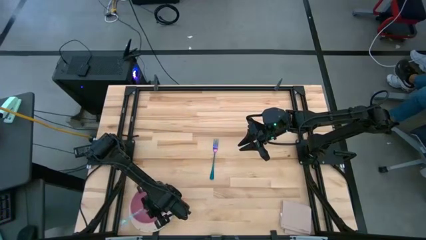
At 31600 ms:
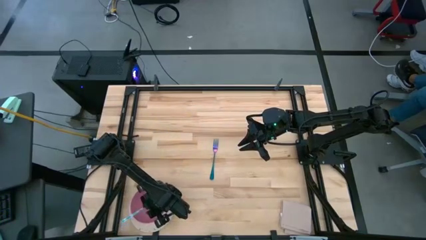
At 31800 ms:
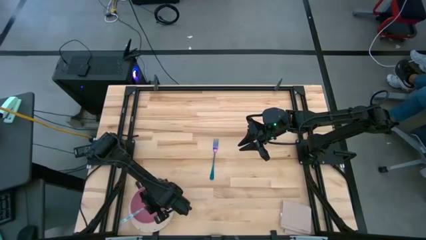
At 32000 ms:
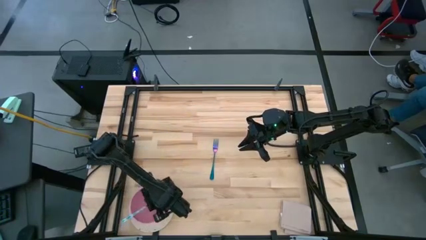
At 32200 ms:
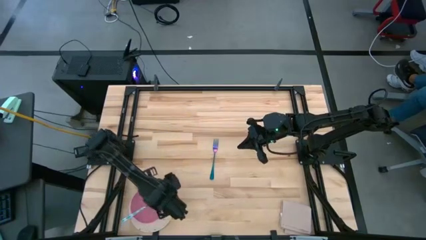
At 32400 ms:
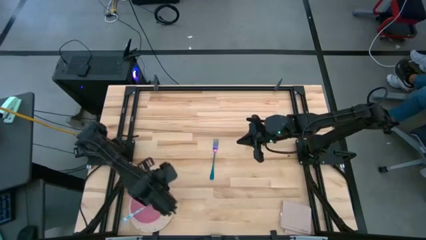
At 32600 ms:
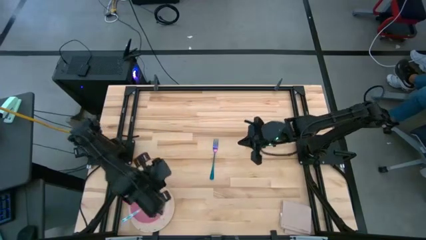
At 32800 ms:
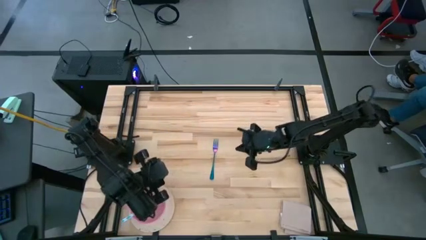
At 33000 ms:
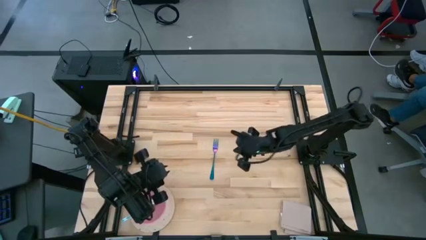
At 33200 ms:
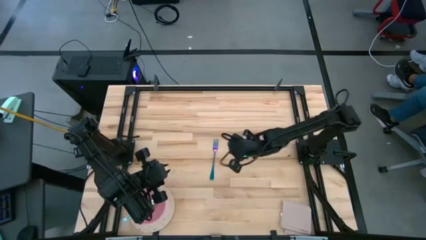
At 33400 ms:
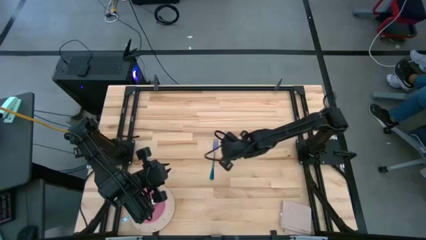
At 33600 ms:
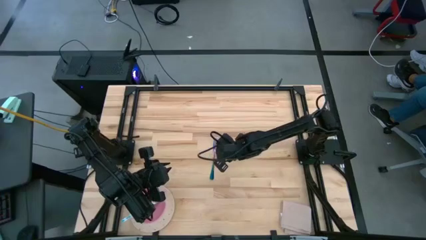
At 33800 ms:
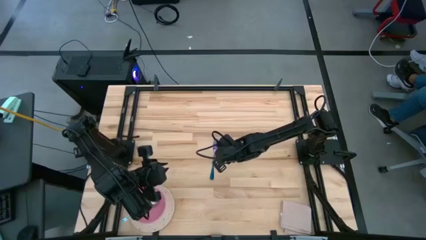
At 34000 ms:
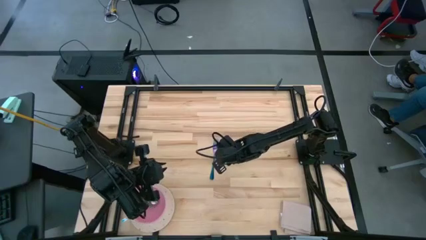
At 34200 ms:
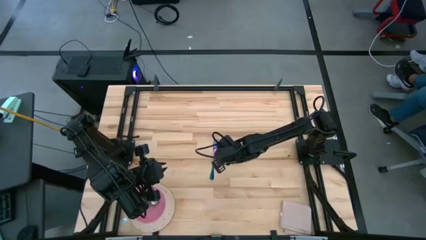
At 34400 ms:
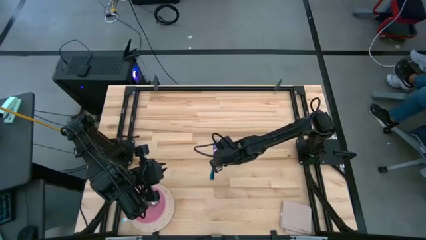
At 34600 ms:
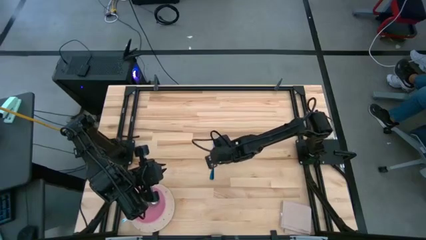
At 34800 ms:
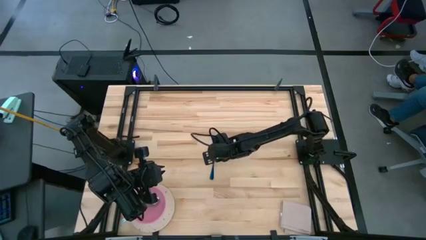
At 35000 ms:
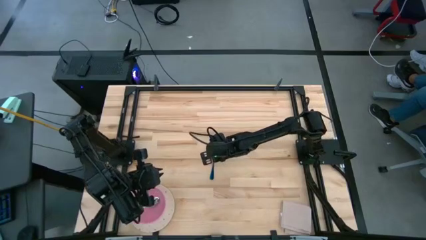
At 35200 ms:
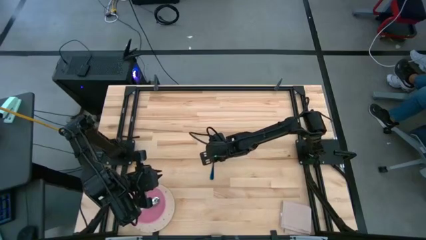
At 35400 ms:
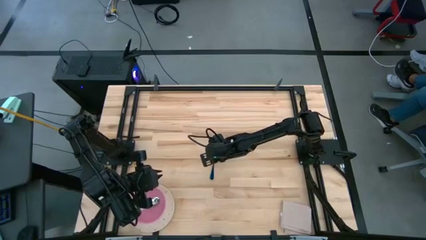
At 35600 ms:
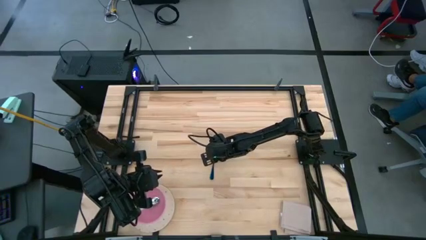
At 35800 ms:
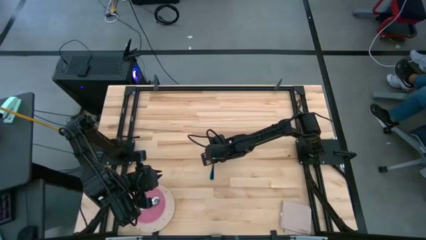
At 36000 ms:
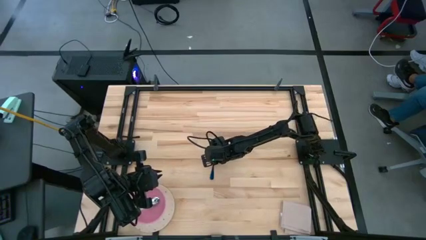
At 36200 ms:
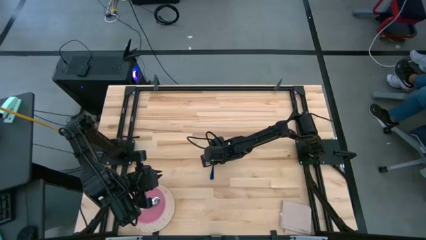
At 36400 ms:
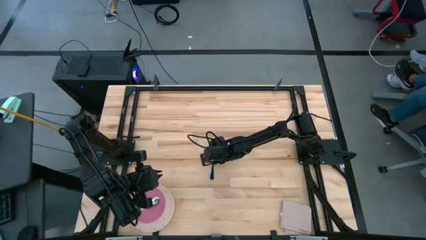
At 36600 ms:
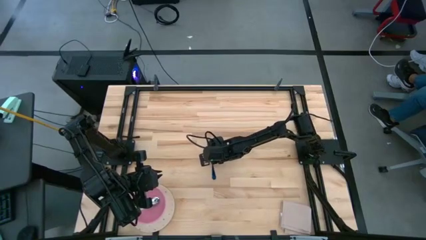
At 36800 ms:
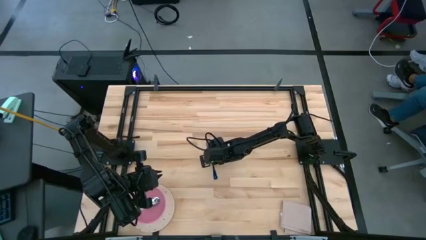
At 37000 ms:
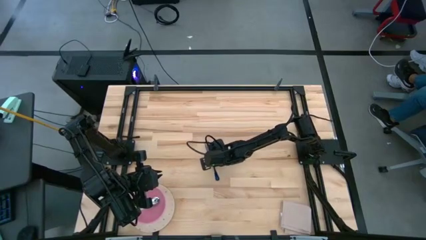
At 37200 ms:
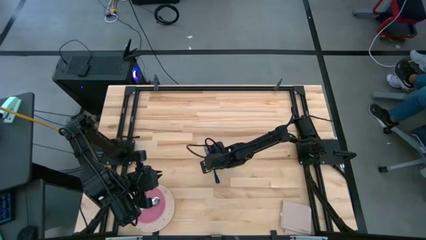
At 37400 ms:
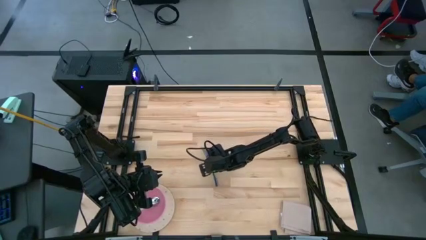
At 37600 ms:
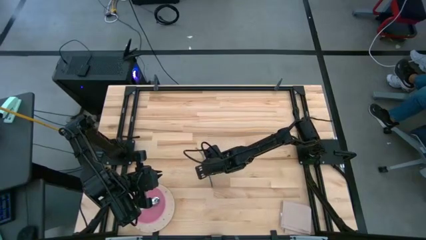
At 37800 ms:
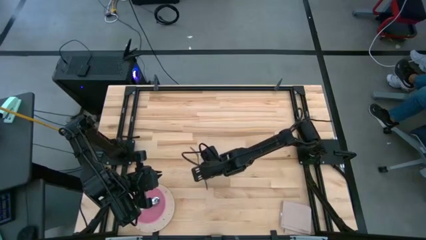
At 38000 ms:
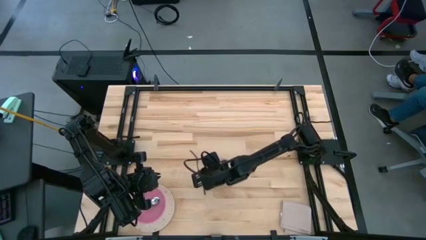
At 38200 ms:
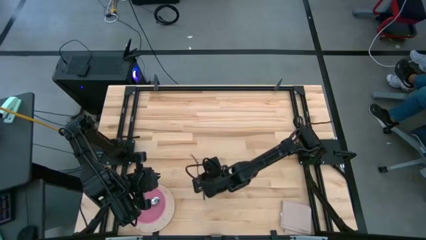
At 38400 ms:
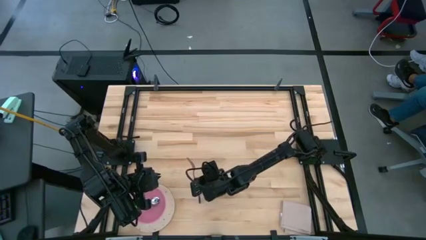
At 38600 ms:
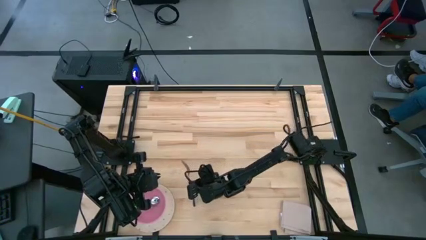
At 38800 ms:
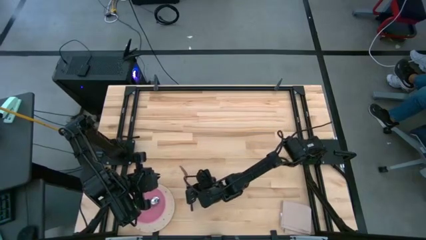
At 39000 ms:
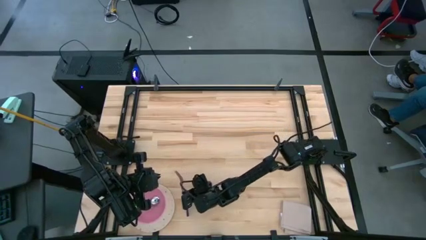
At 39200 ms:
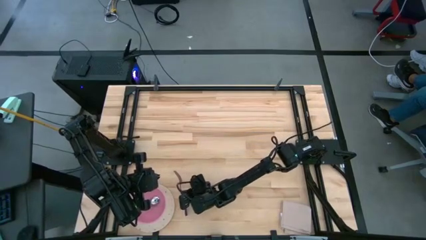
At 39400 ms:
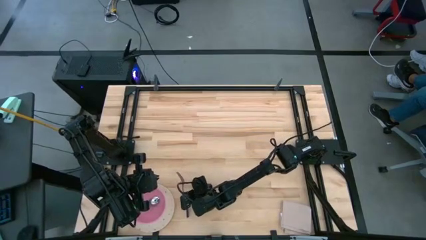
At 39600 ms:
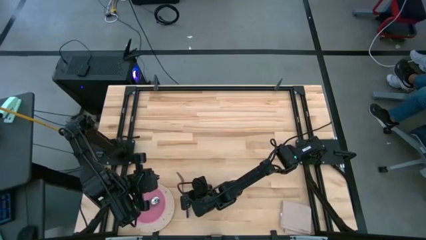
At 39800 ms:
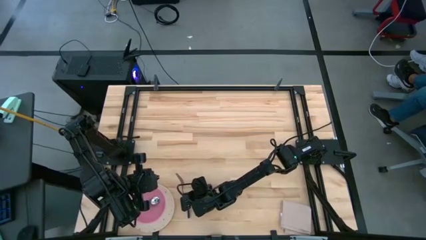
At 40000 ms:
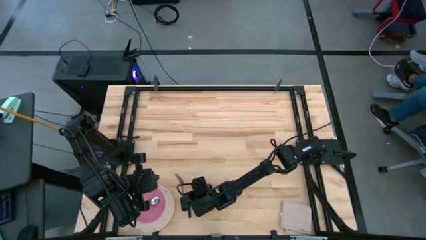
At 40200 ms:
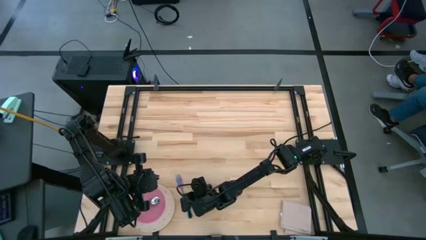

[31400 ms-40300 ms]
Task: Set table place
Put the fork beside the white pattern plate

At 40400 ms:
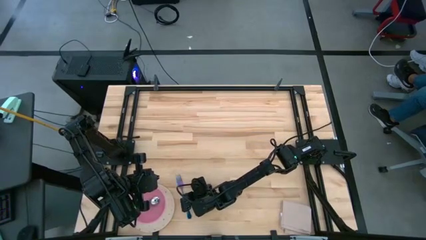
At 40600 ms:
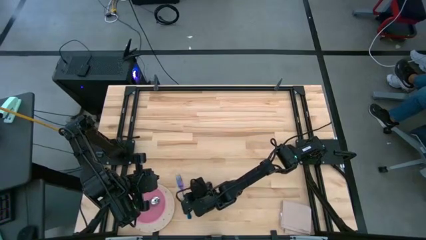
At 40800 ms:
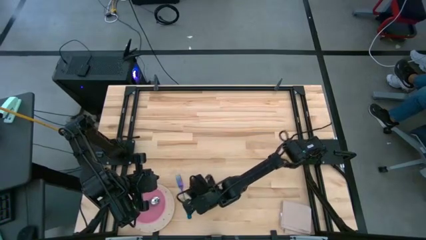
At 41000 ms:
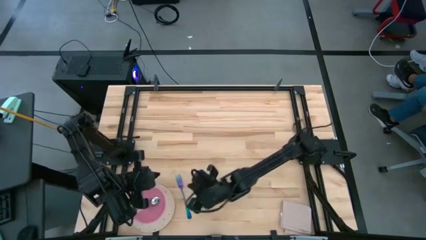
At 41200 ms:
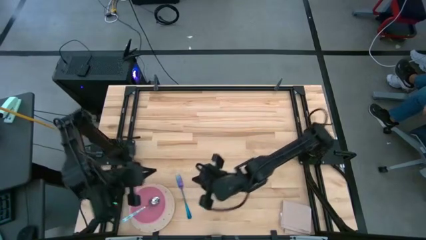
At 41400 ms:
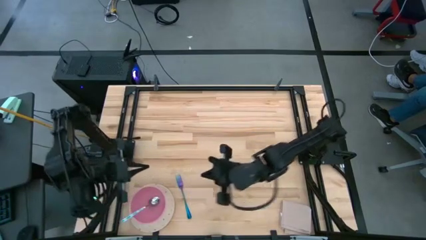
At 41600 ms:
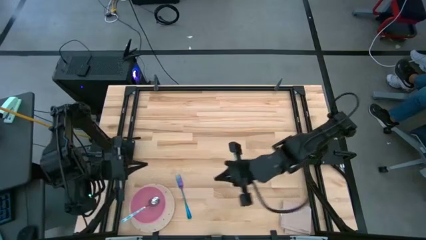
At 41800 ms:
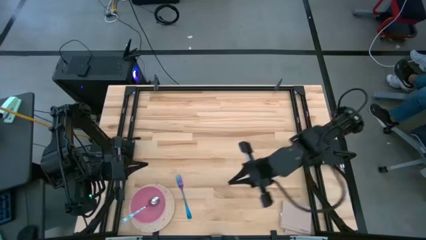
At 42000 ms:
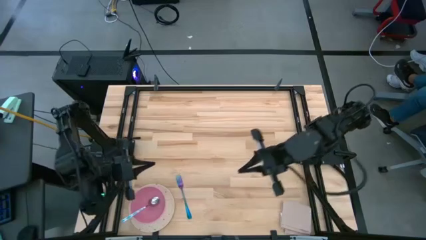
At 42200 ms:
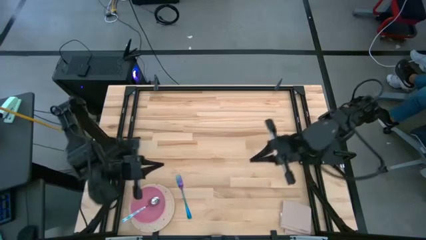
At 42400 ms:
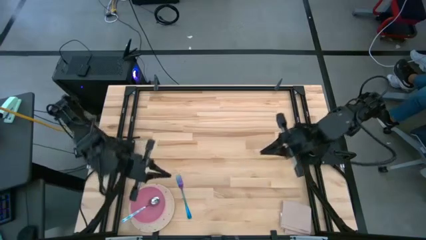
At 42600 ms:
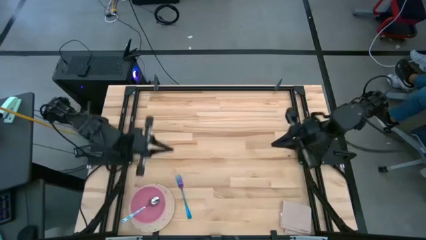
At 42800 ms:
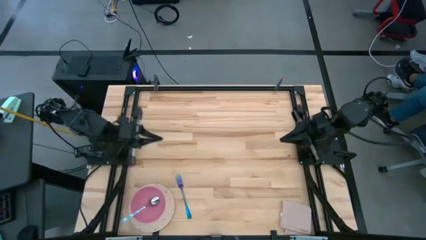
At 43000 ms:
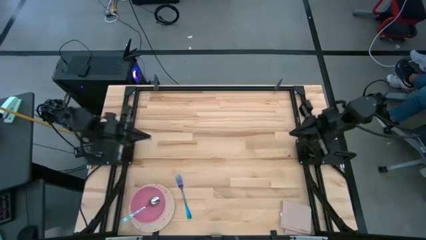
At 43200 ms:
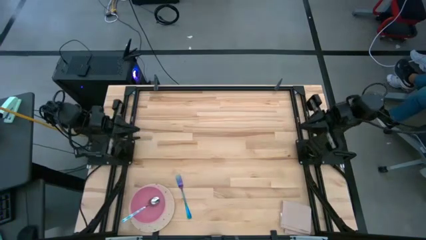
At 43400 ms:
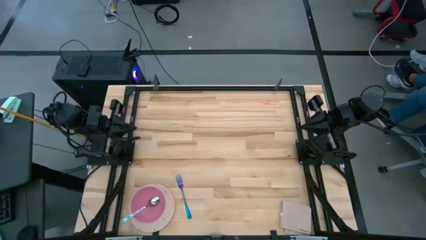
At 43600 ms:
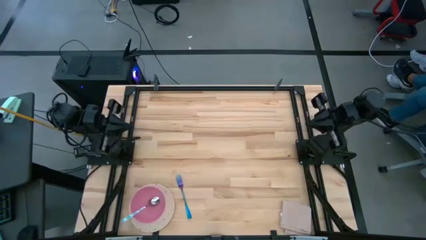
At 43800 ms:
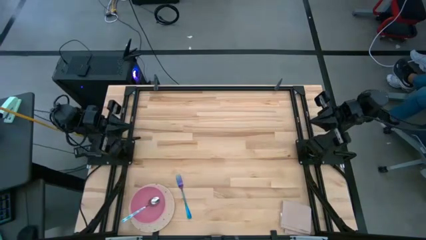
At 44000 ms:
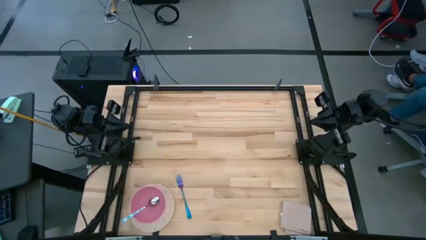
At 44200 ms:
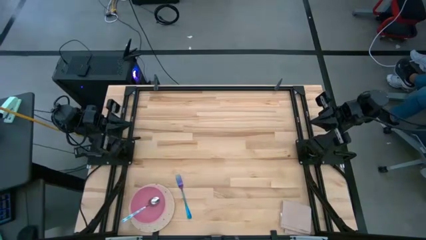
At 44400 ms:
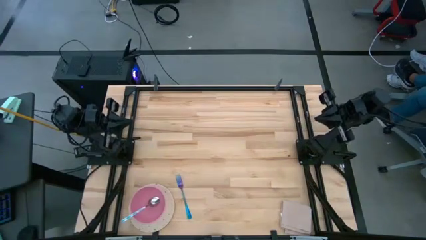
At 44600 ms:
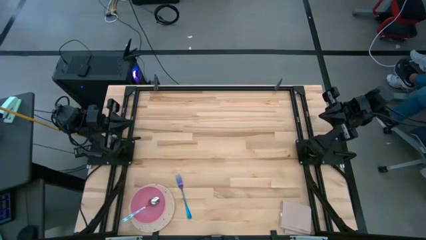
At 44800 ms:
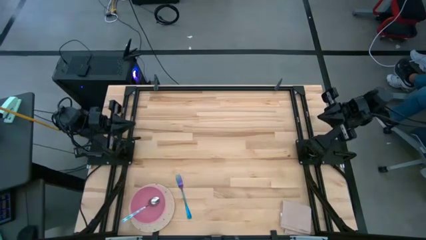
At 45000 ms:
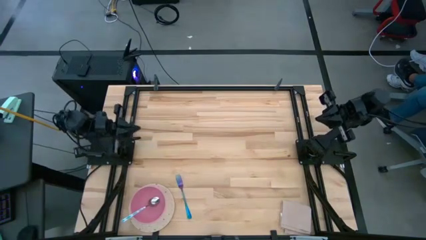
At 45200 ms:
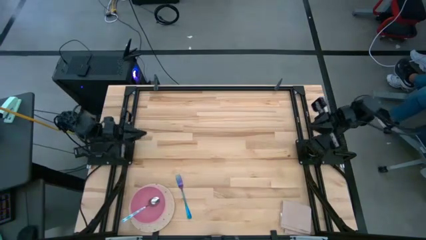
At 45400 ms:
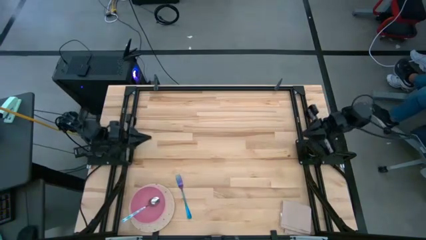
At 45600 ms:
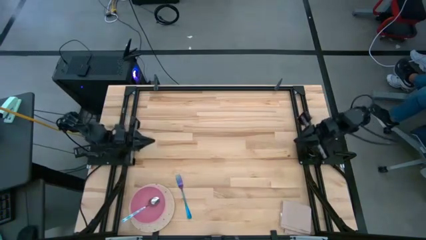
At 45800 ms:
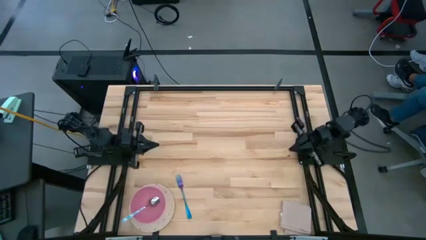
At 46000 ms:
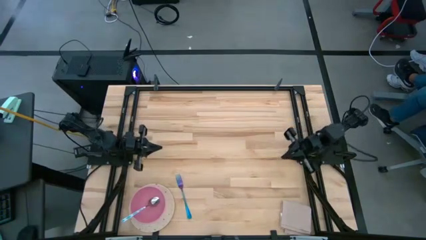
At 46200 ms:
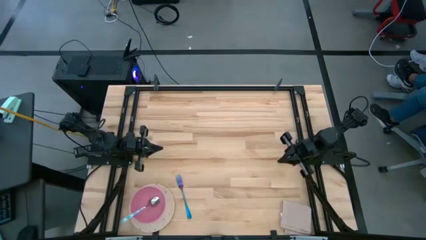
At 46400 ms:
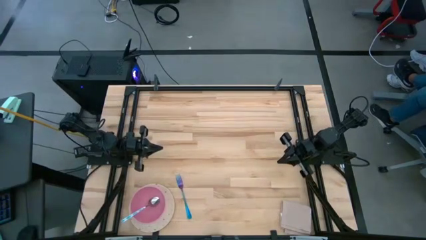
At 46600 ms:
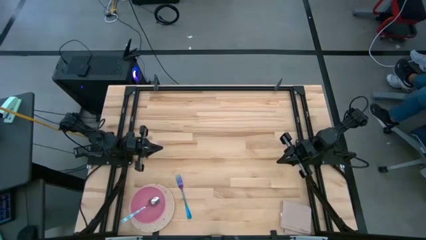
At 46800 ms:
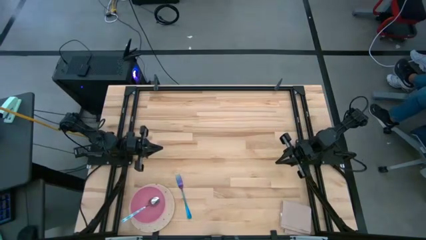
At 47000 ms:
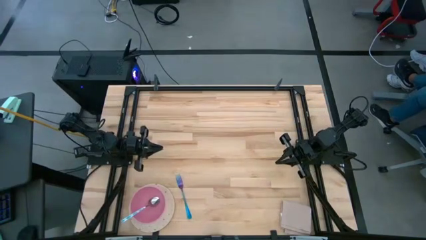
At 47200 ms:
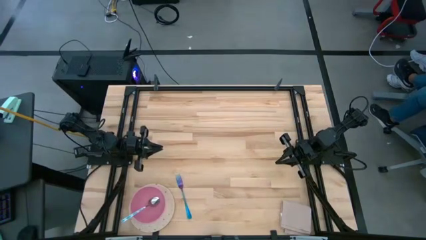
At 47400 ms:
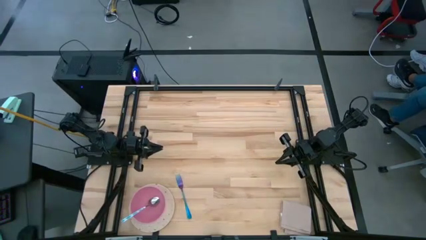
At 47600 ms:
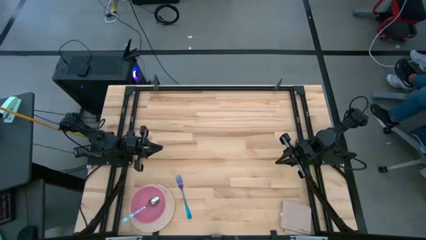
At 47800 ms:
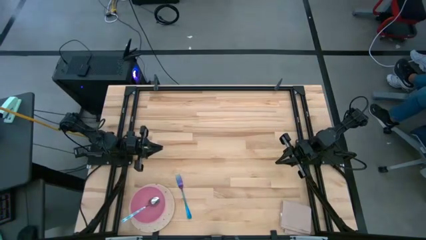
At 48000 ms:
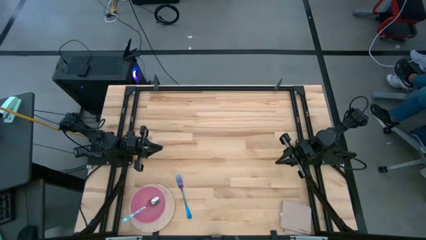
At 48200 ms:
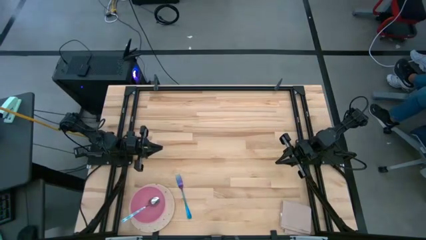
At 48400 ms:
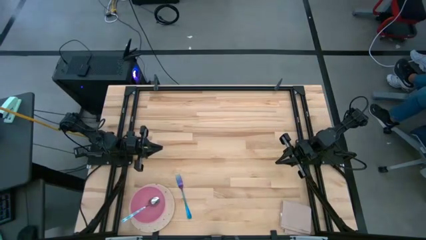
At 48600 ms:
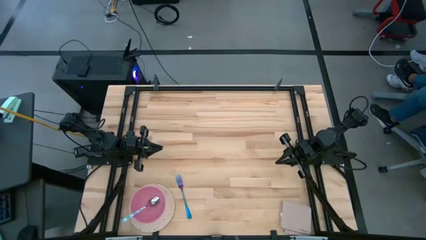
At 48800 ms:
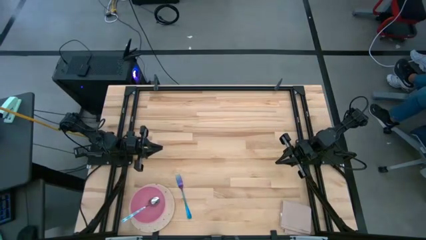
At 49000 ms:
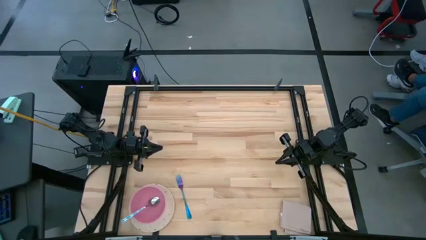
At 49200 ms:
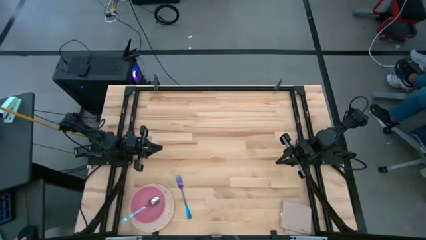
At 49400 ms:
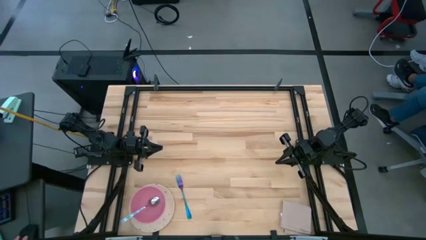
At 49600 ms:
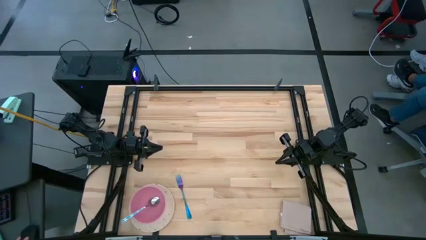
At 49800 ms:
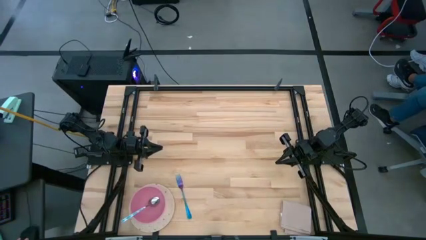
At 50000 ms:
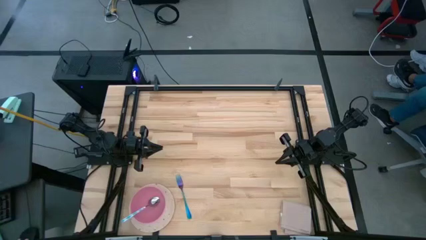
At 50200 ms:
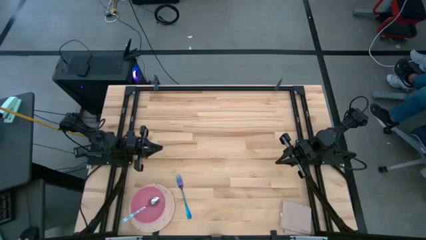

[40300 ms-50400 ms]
Return to Home Position
